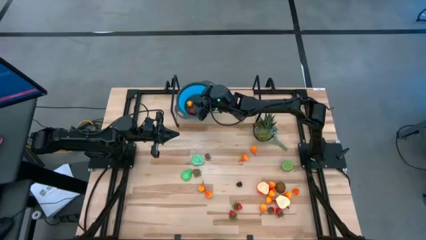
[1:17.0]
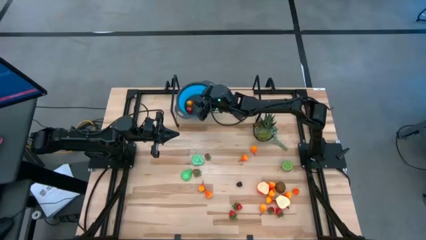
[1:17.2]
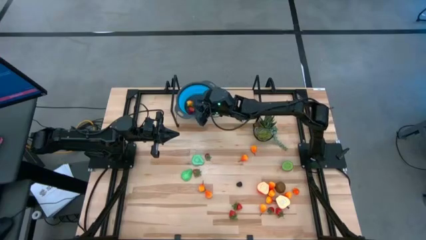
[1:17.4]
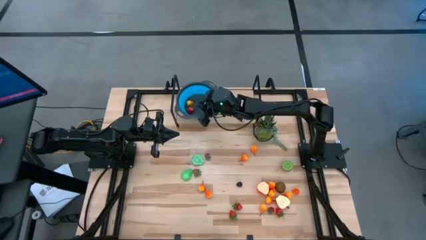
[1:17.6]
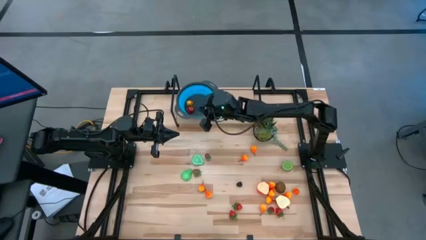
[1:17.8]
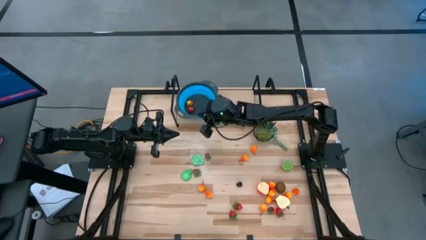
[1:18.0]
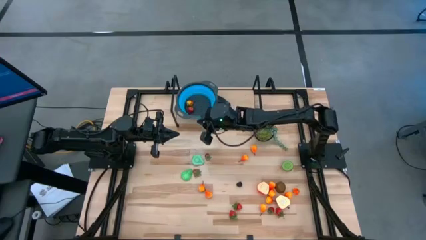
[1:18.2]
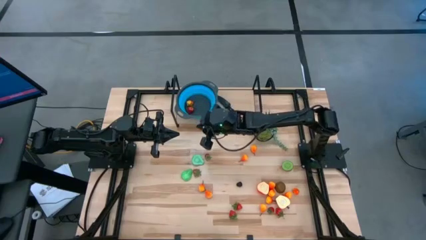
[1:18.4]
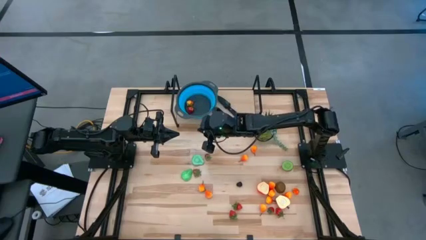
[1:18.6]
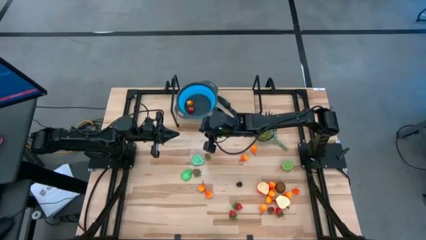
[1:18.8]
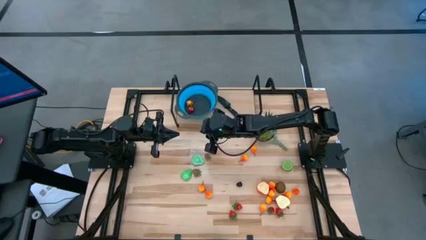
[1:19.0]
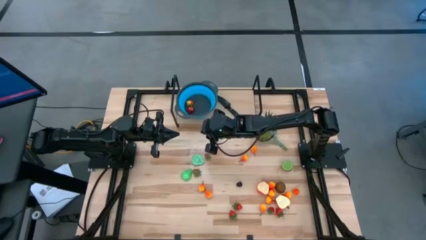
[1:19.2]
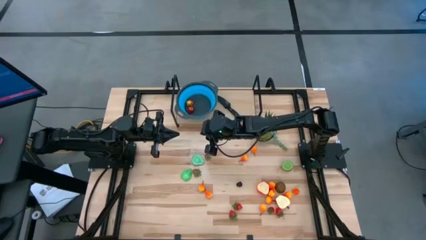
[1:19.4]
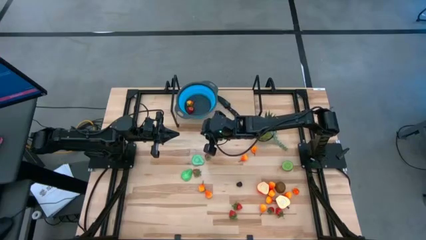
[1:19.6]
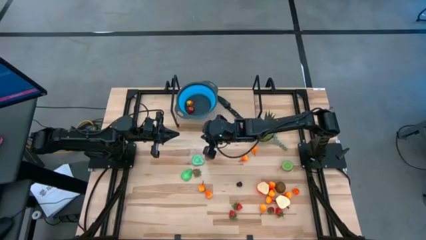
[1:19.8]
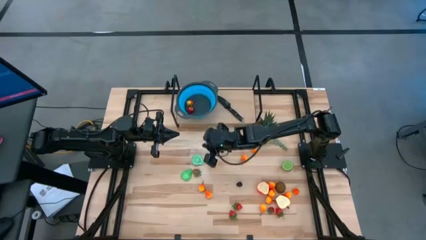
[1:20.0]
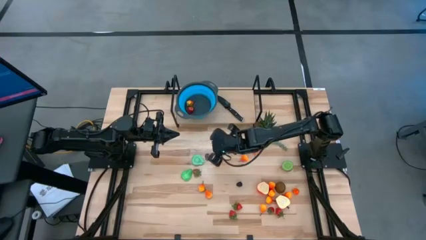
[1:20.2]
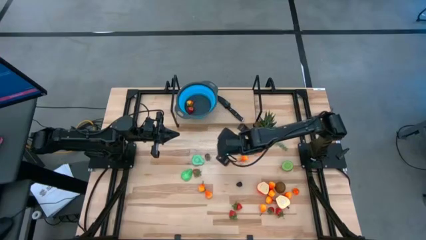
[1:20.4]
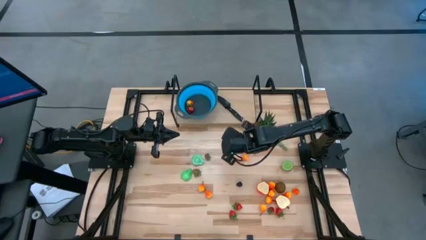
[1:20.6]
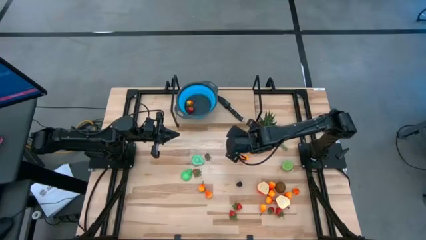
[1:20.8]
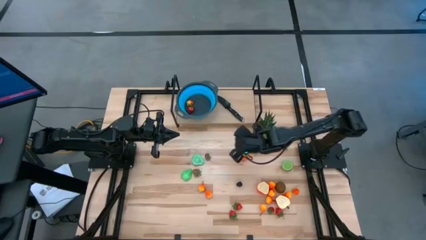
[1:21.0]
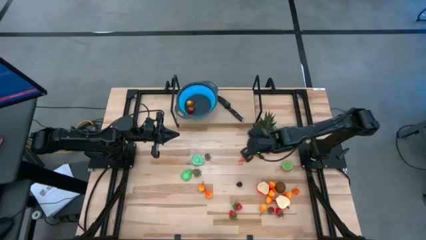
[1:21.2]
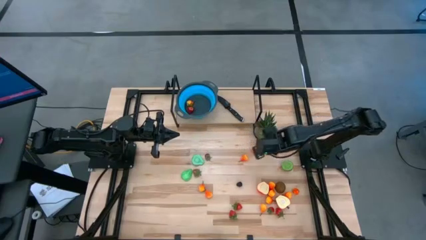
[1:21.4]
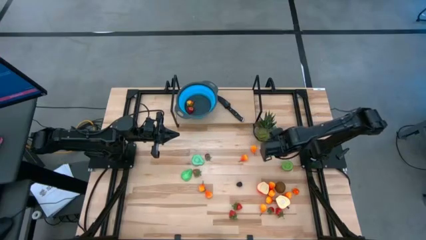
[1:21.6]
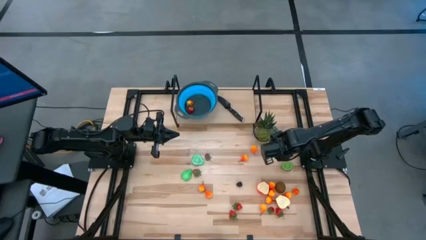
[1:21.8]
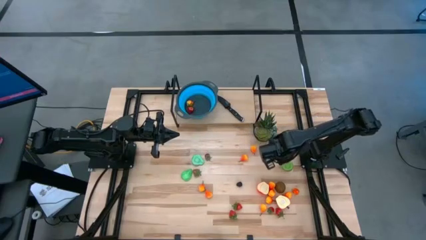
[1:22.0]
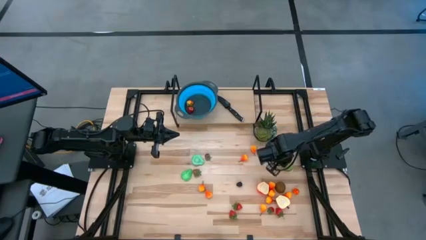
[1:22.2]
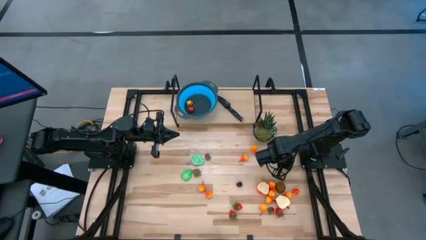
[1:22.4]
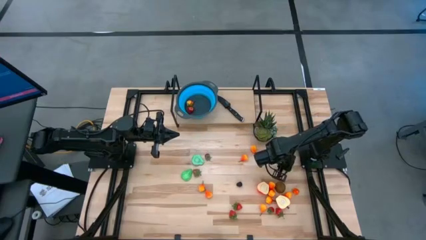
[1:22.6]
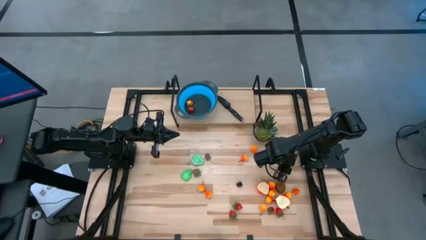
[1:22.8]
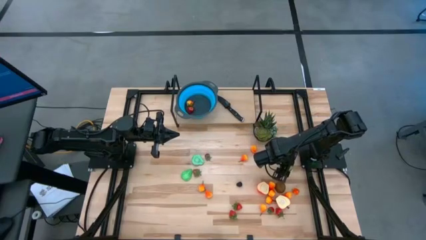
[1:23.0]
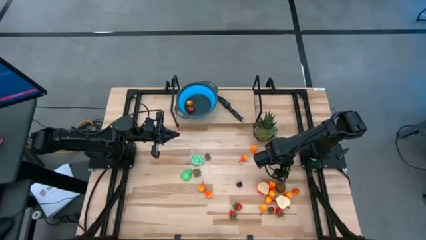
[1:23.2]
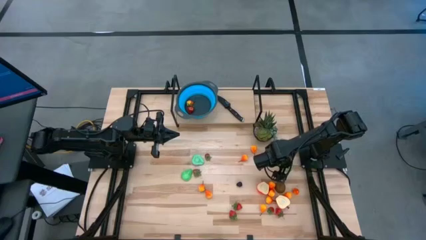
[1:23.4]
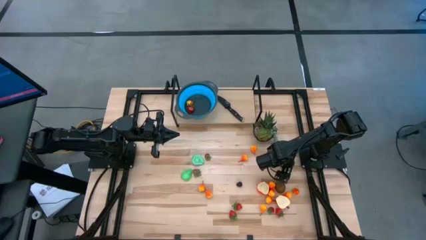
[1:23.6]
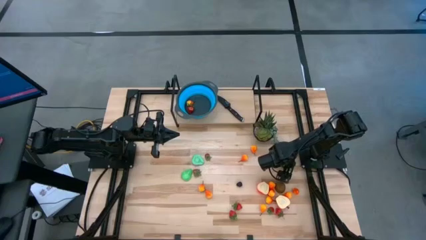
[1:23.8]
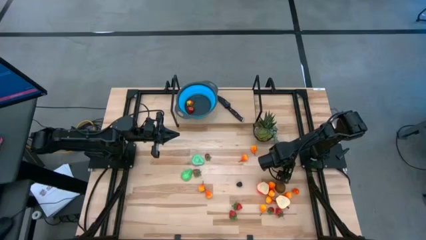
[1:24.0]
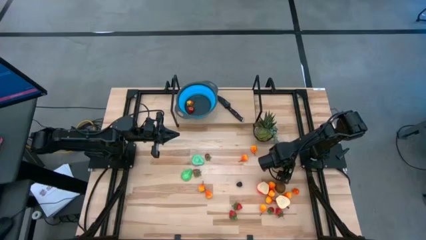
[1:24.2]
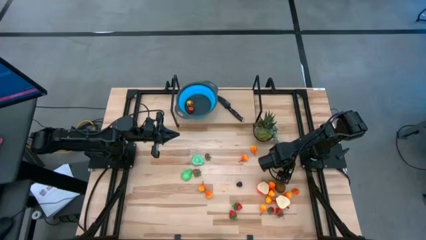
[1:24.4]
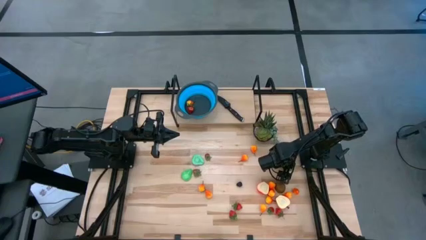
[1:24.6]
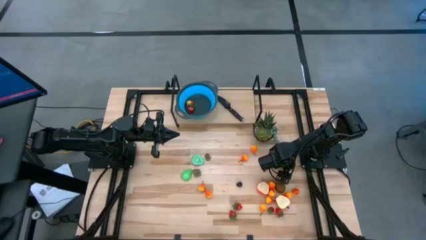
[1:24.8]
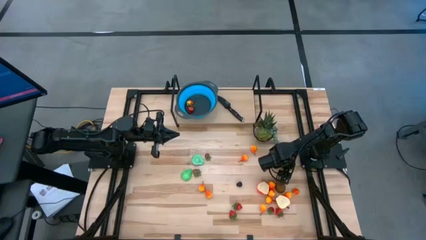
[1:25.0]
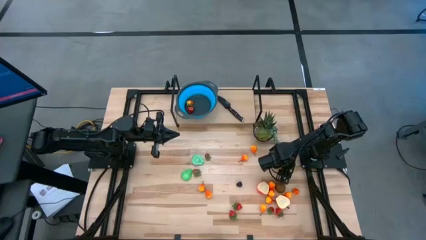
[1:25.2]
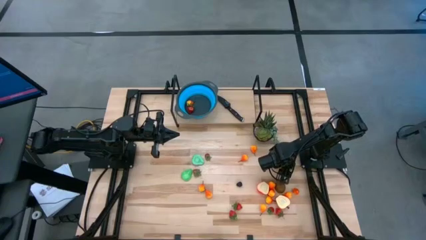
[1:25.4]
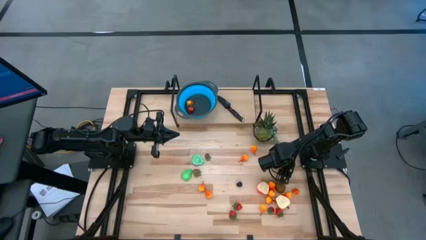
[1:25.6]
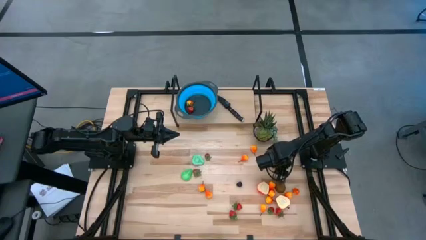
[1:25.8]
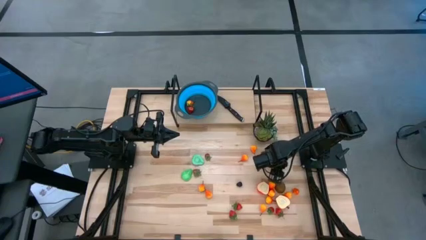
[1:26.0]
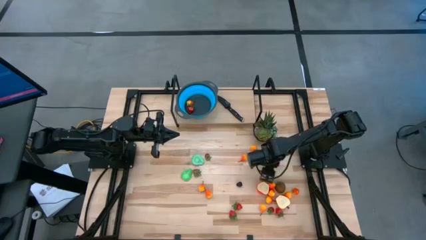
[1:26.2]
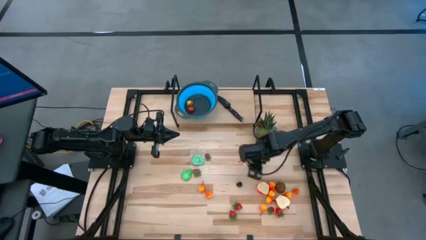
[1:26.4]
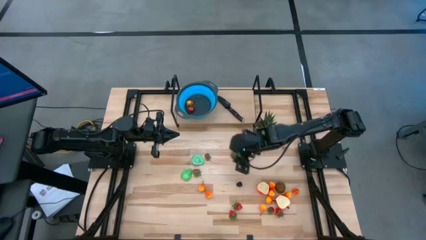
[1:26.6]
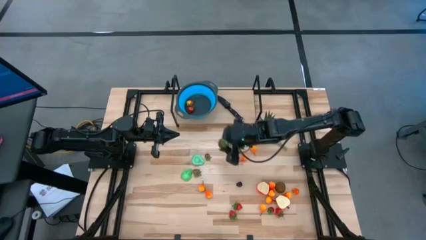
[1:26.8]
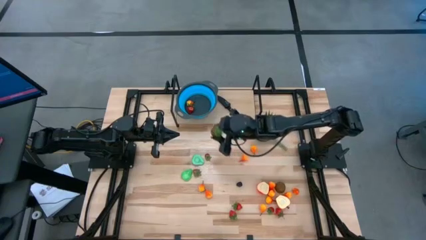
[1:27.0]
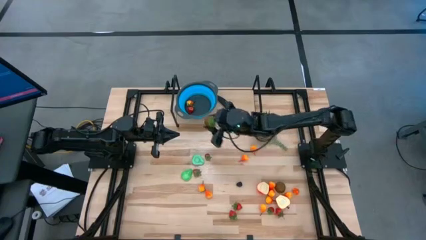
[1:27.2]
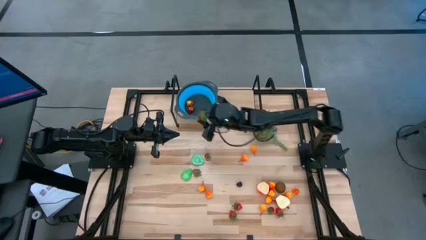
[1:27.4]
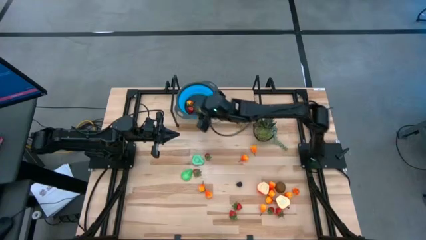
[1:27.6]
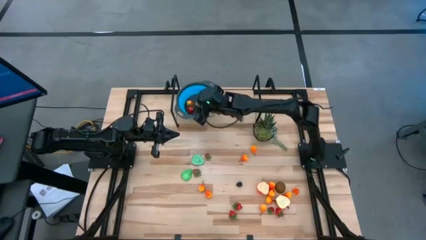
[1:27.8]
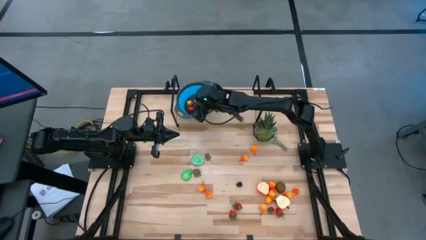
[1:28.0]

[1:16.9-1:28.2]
Task: Pick & Place Fruit
Put the kiwi into the basket

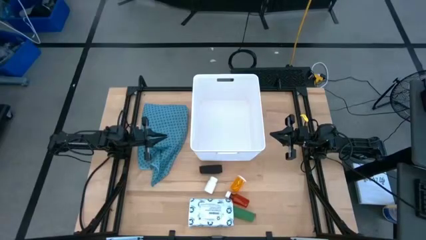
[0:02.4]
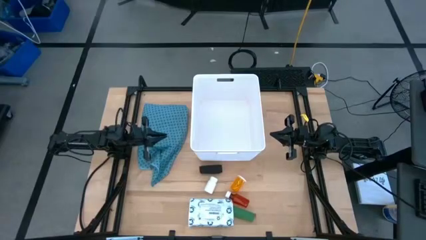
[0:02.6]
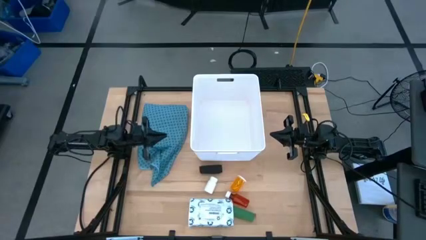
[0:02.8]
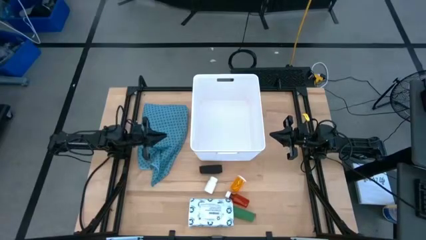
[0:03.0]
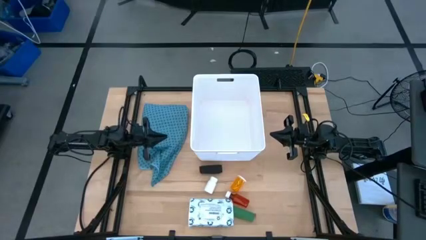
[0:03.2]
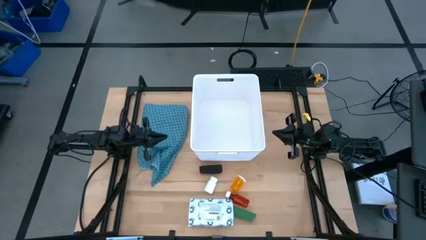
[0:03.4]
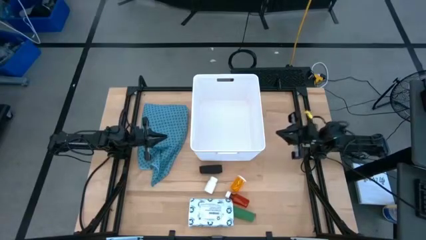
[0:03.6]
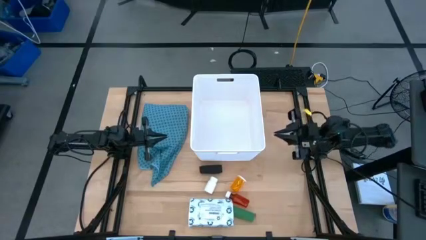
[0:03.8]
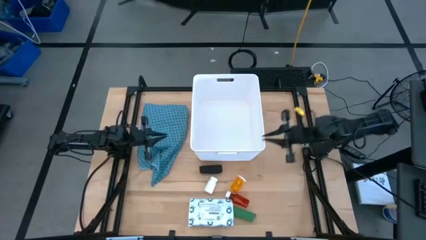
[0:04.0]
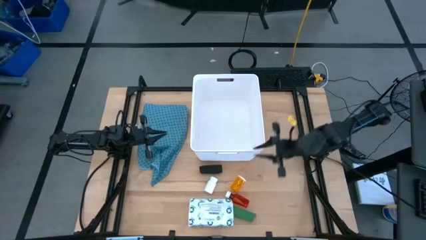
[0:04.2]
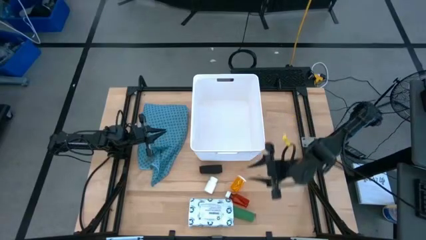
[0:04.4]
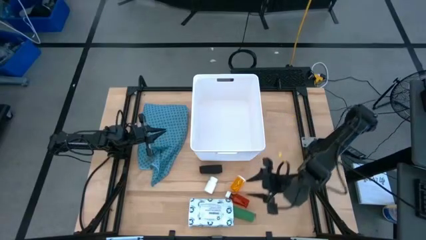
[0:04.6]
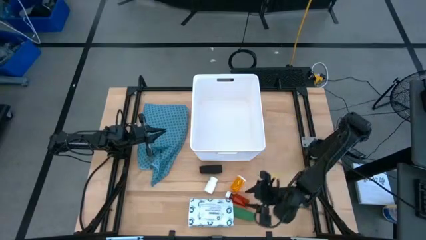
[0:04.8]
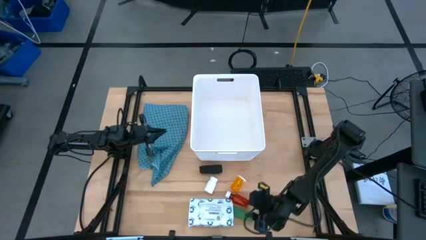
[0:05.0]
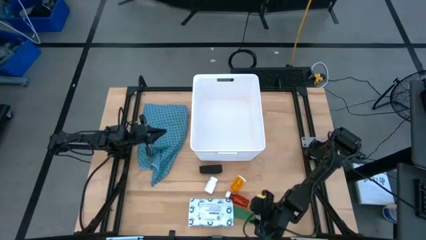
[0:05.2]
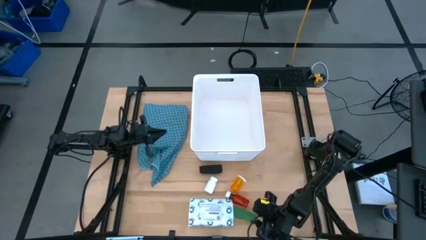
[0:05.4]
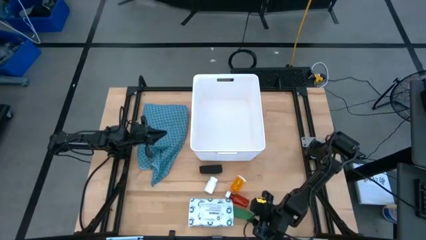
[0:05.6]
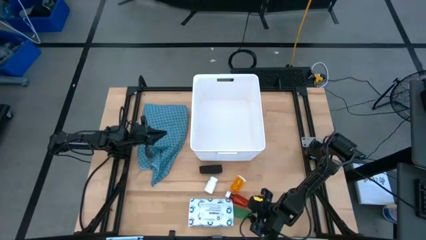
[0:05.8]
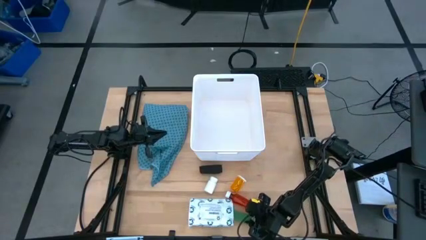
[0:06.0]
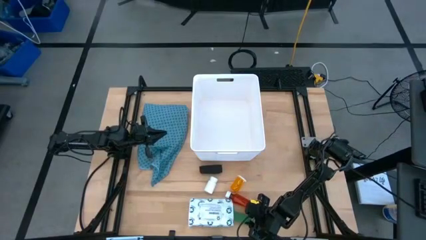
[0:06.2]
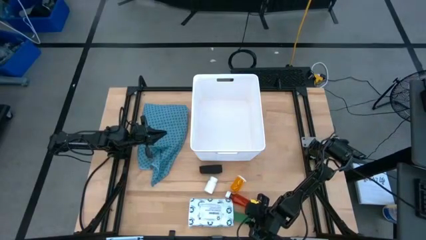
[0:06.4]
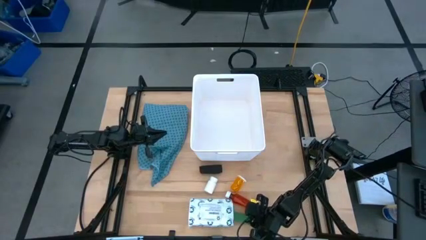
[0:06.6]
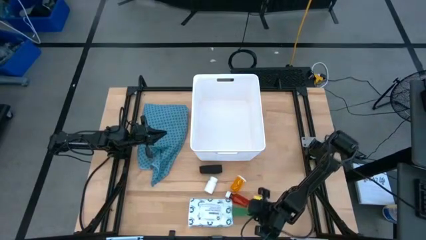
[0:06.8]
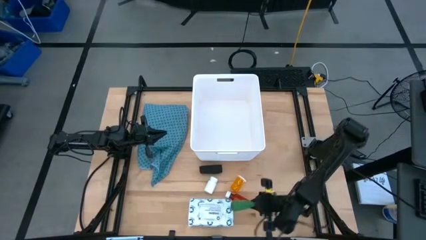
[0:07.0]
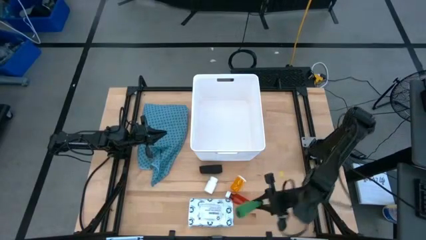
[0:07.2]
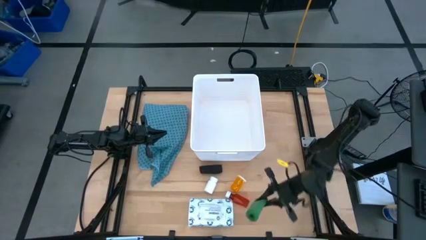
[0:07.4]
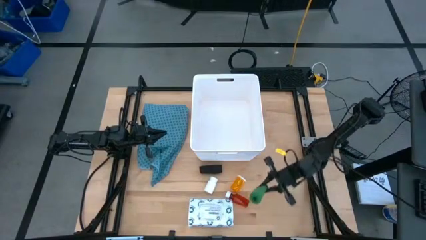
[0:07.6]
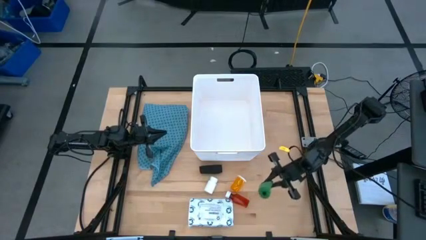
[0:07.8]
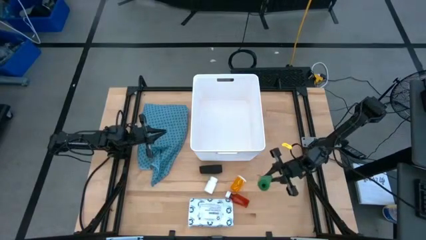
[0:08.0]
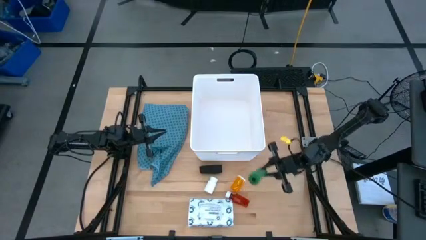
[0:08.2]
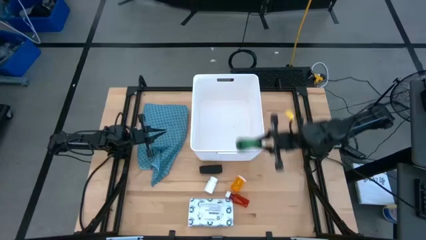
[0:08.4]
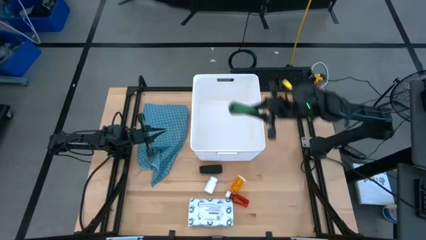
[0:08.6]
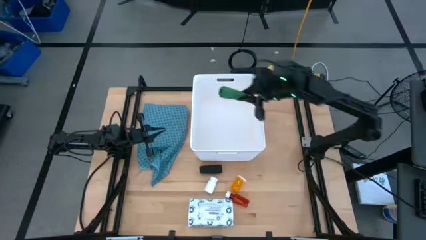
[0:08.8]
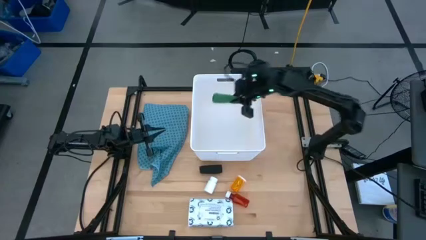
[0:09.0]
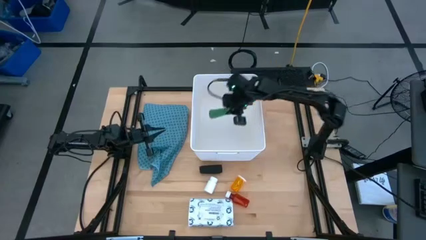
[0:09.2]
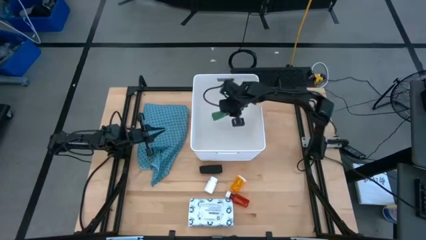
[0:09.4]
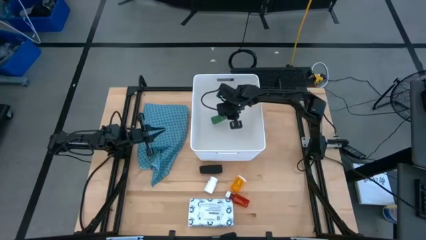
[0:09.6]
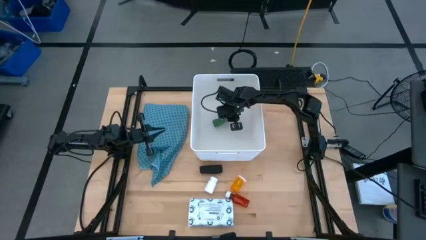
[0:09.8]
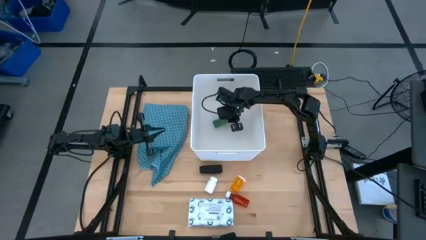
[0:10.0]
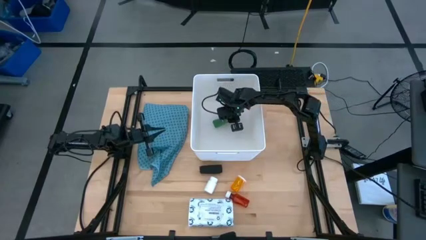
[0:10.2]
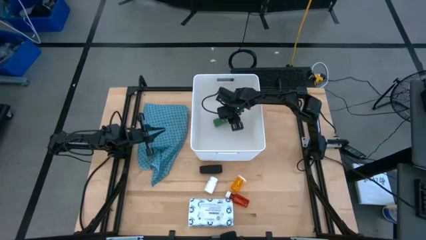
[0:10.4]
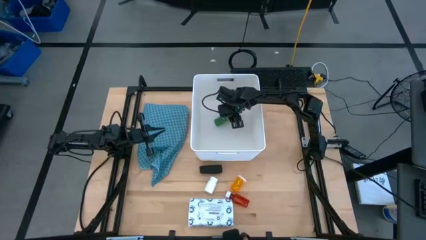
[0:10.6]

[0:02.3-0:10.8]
Task: Pick & place medical supplies in basket/bin
Put the green bandage into the white bin
